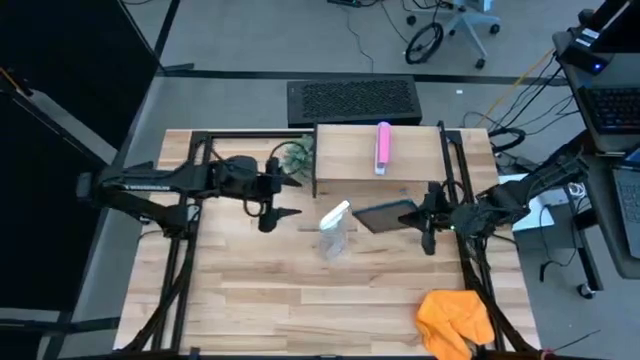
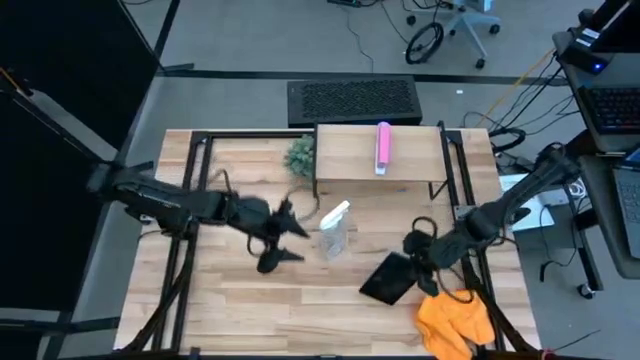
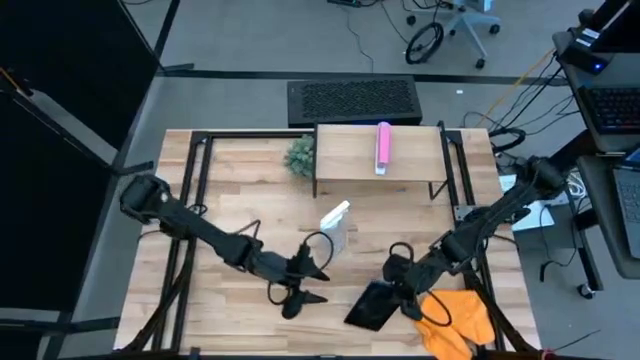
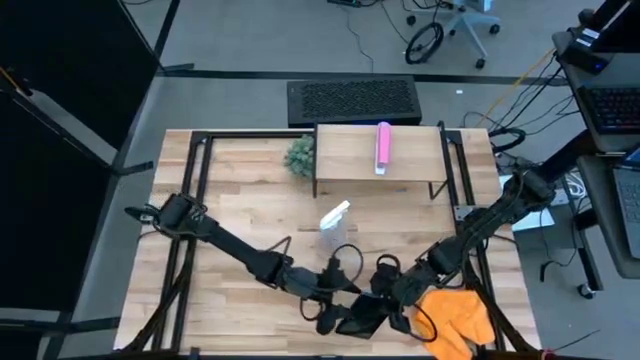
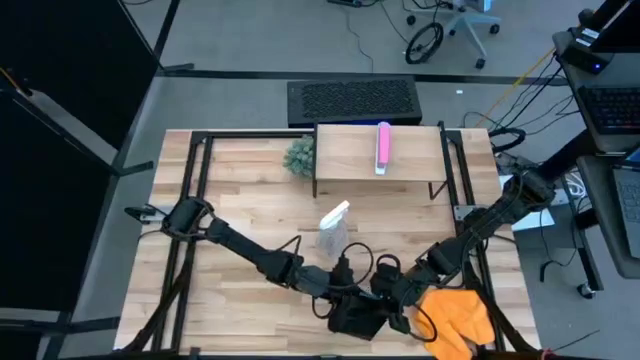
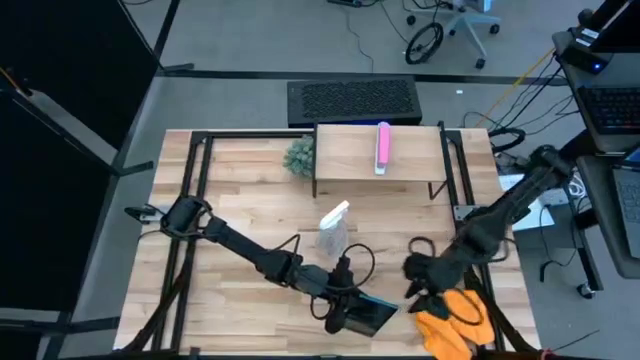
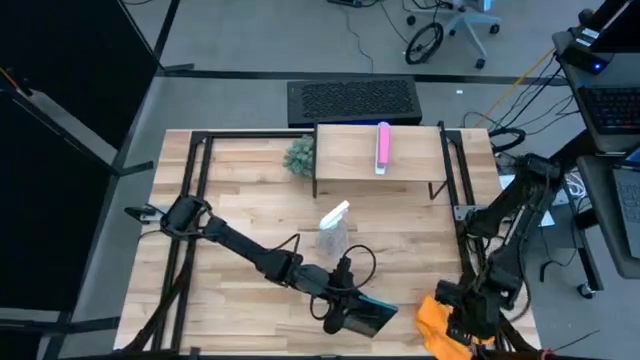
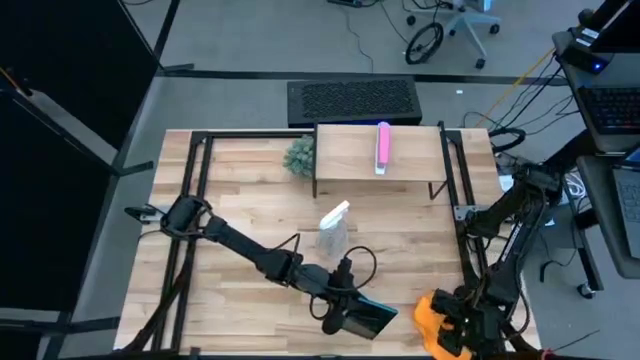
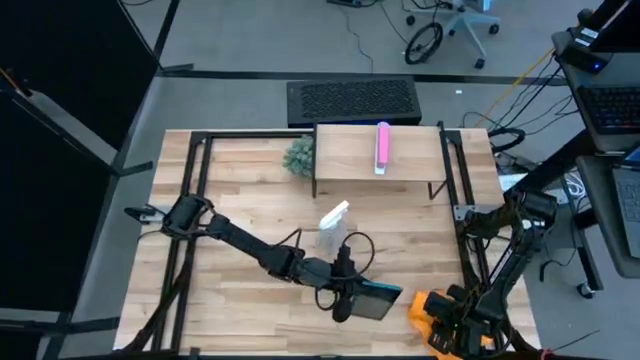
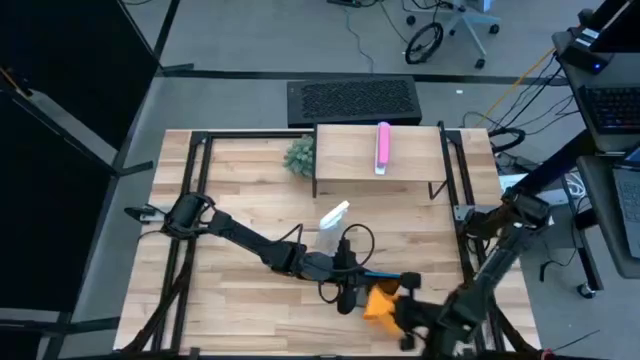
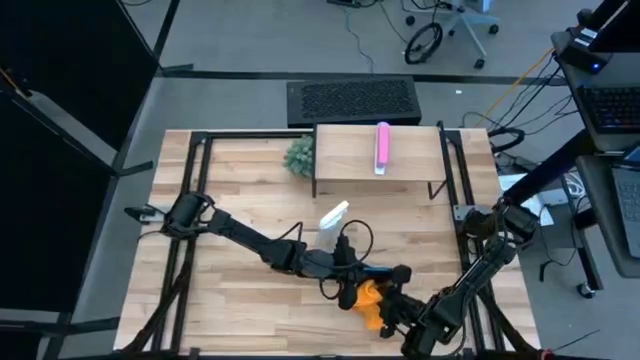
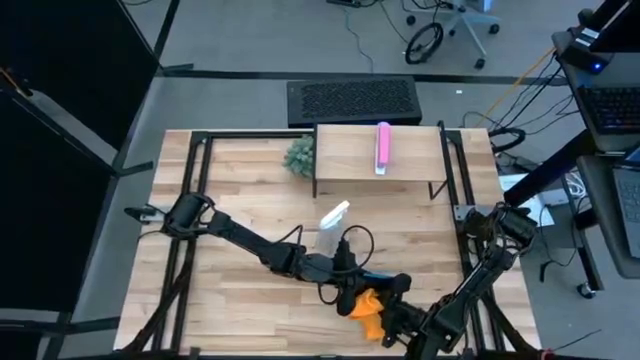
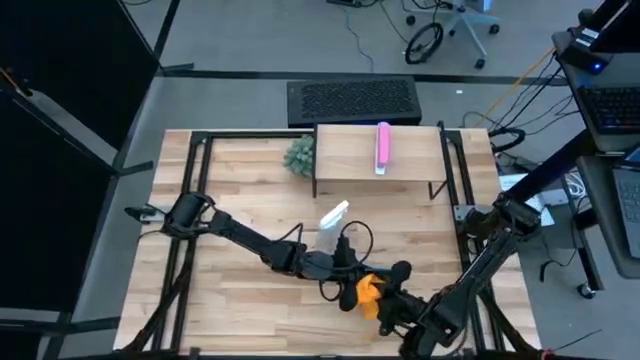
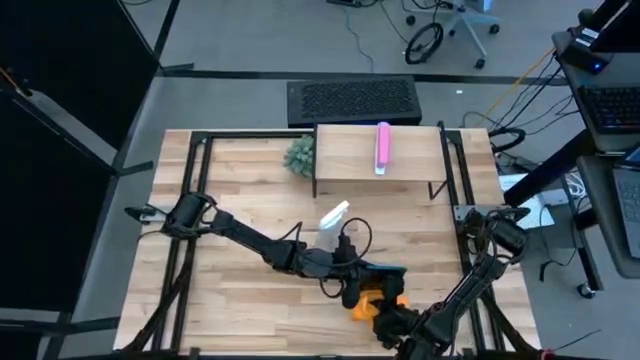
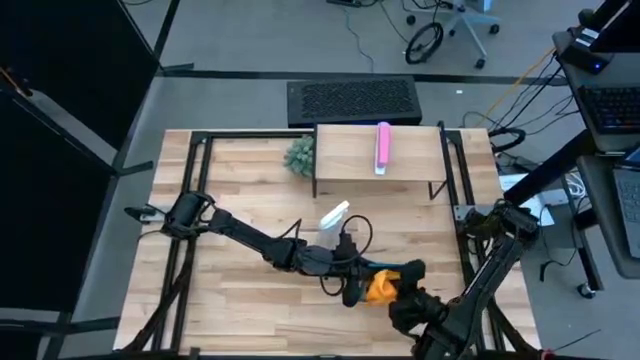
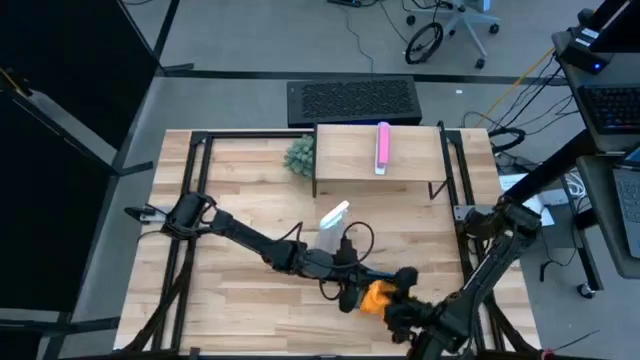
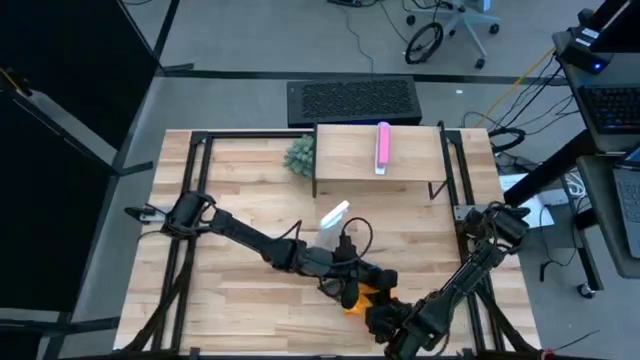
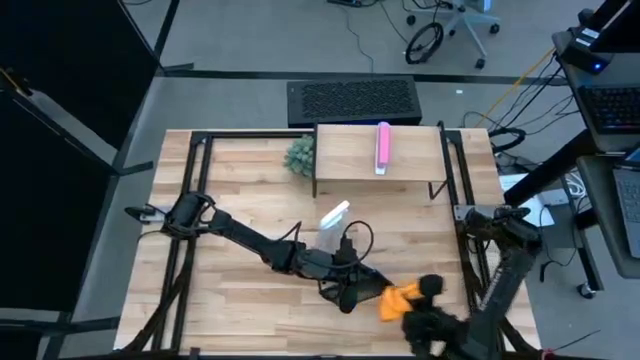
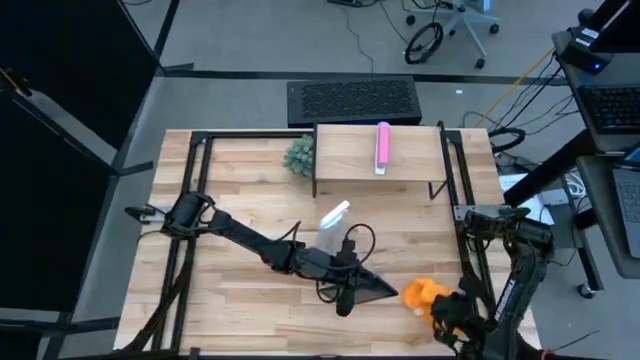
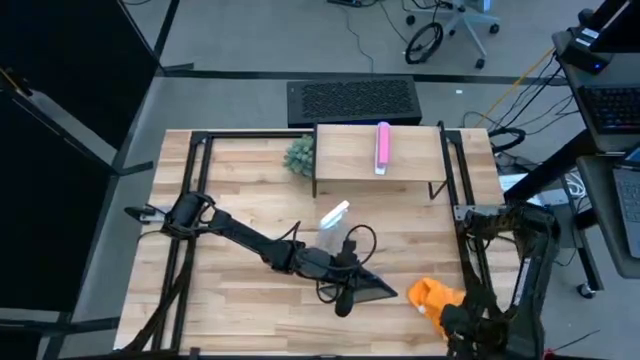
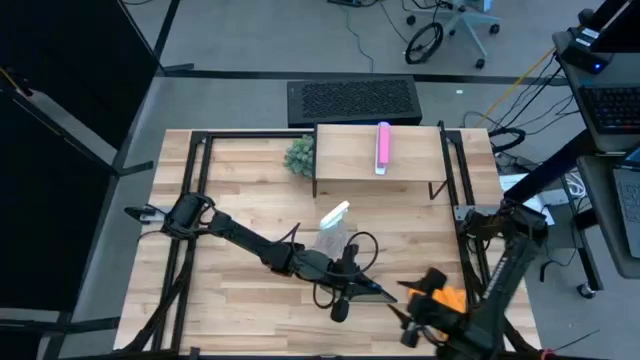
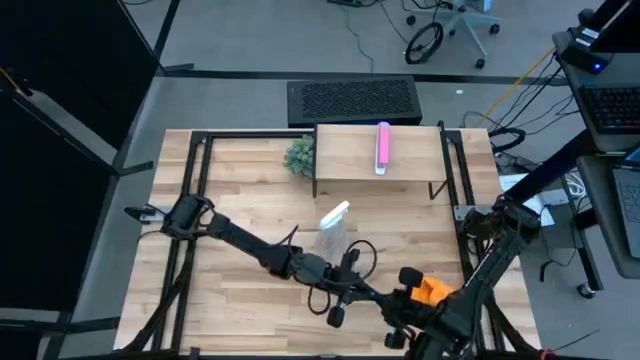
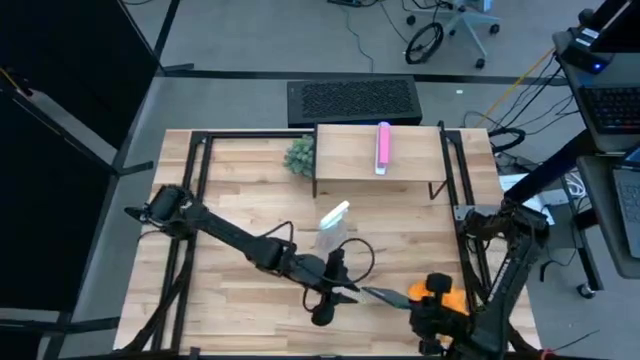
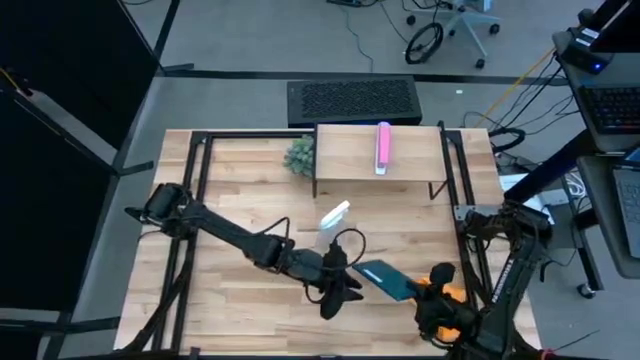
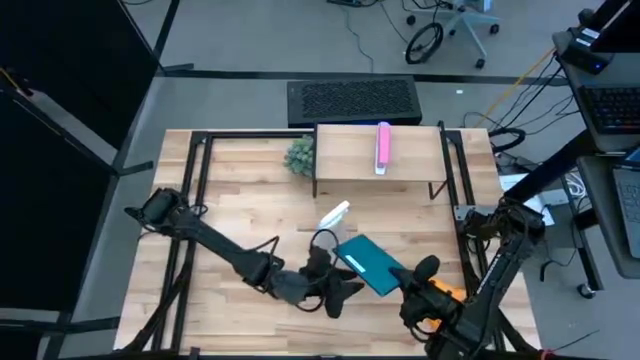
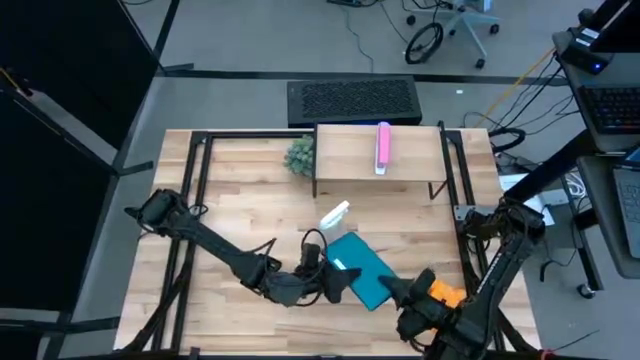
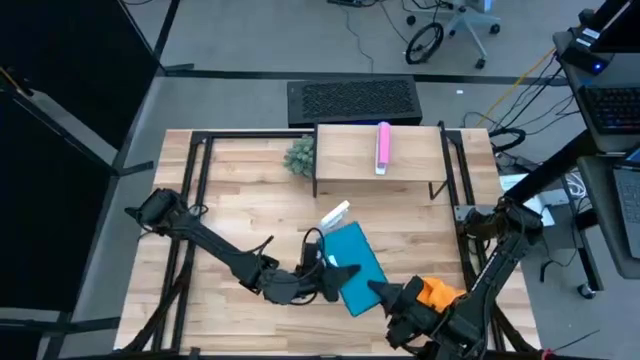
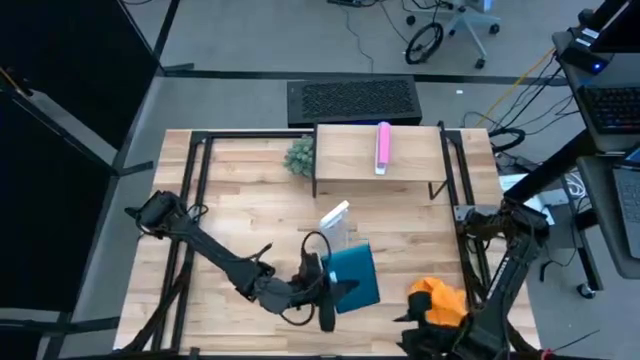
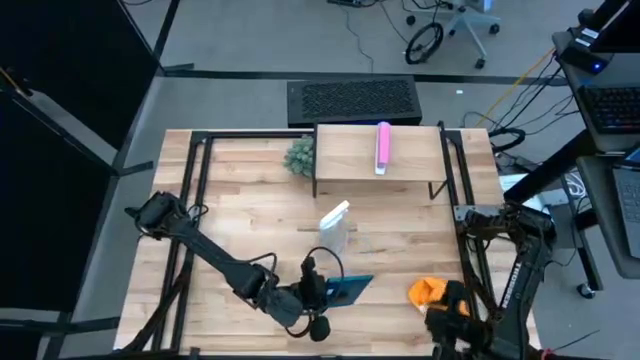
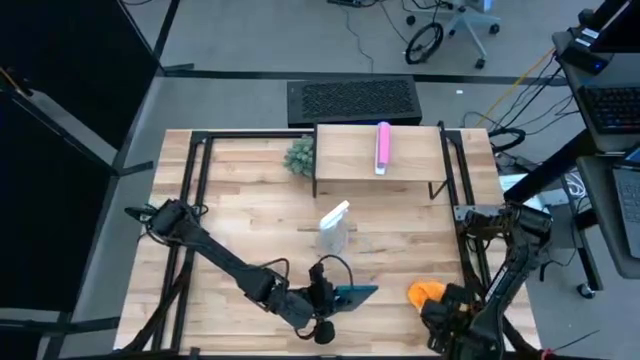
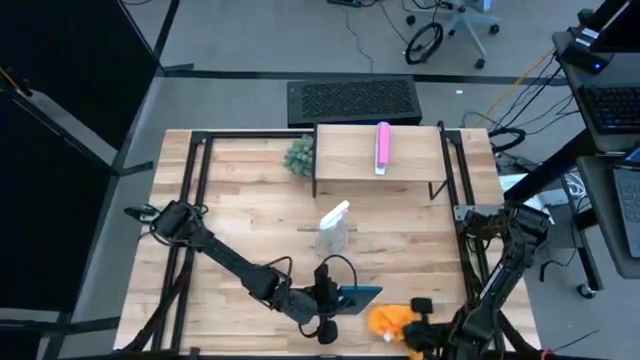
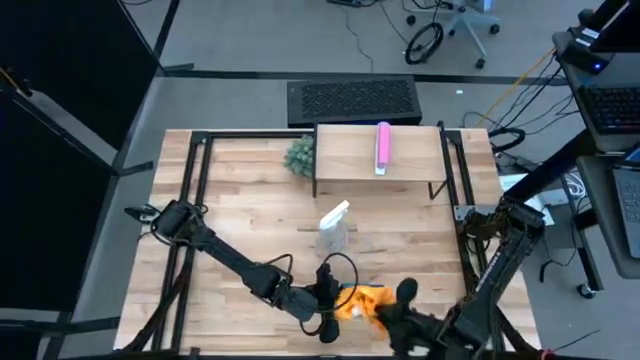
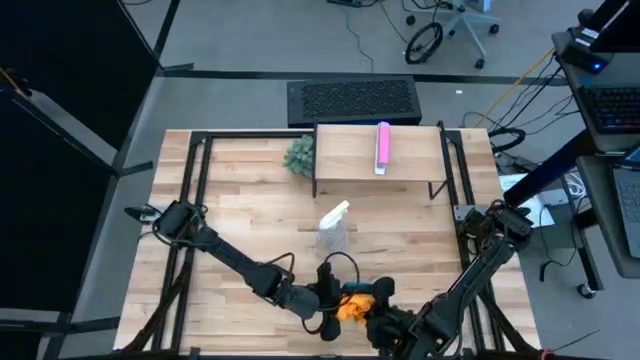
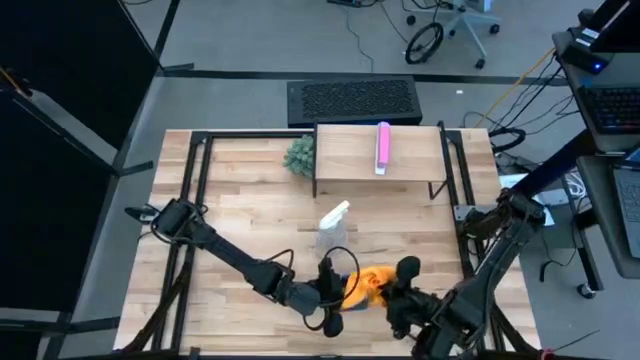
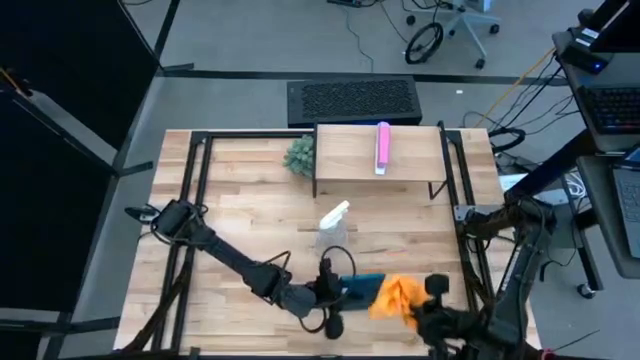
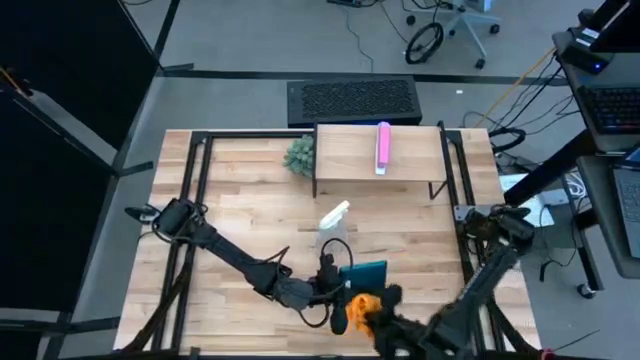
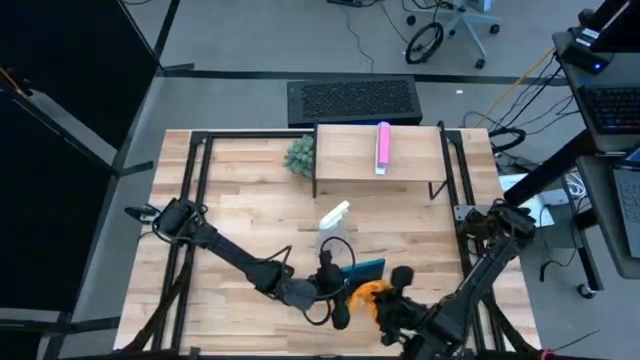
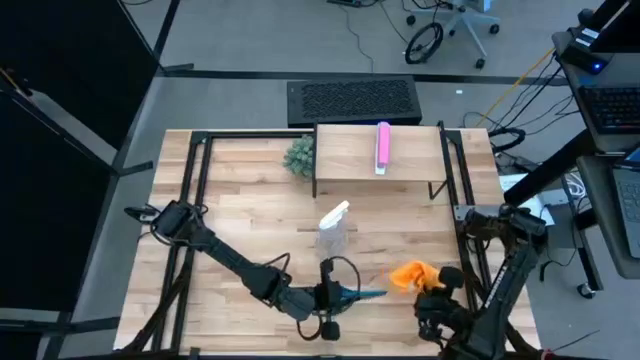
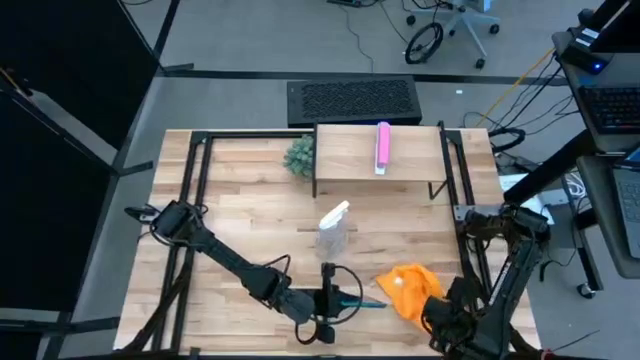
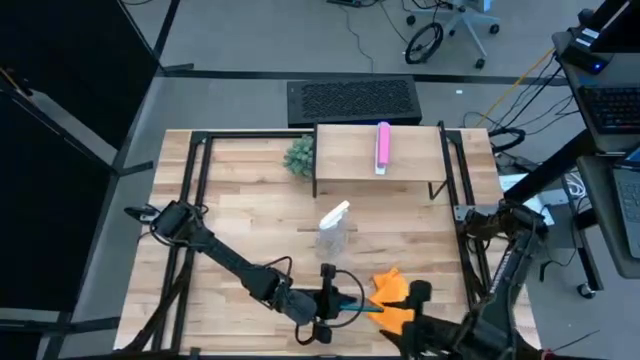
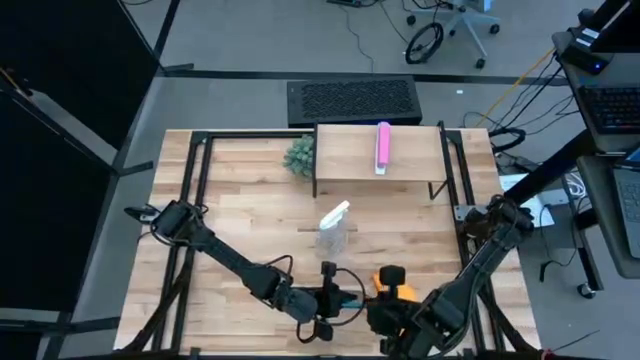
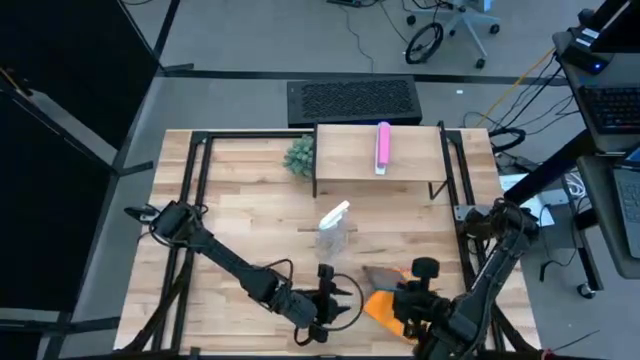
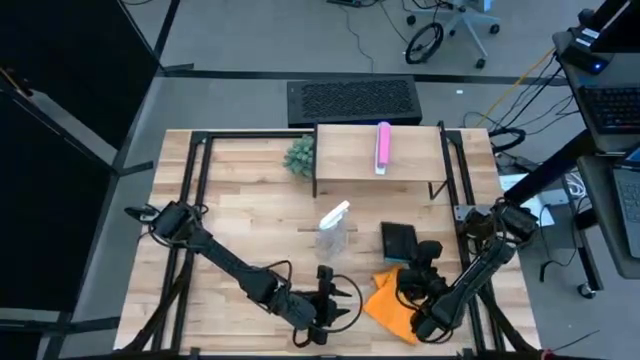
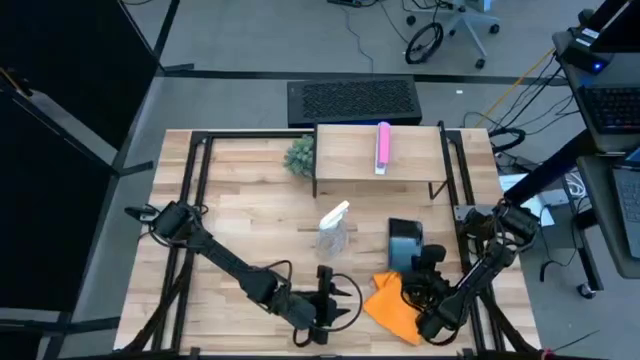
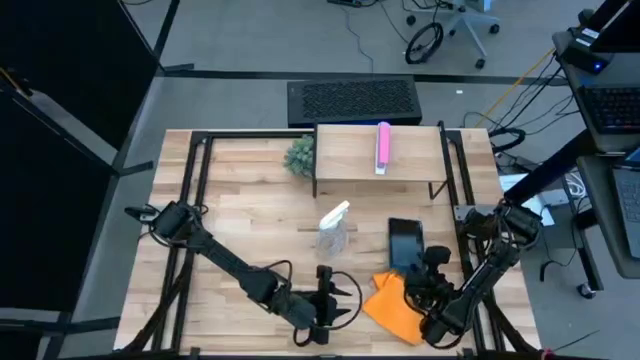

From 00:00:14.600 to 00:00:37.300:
Task: Apply microfiber cloth
Wipe the front and back of the blue tablet using the orange microfiber cloth
